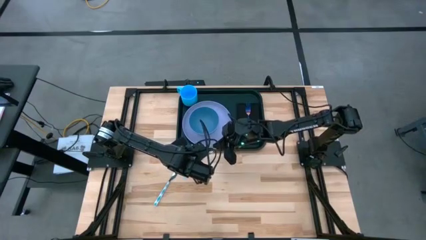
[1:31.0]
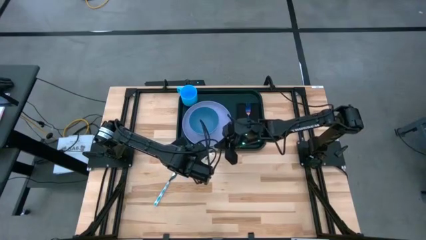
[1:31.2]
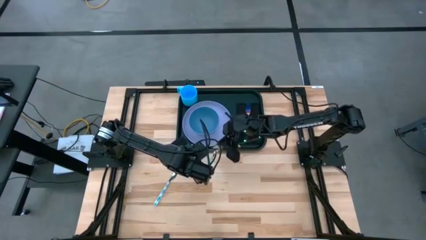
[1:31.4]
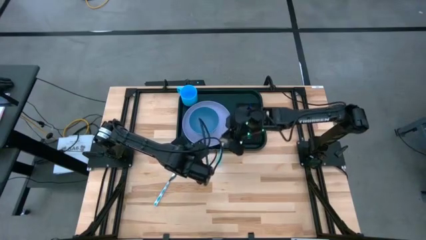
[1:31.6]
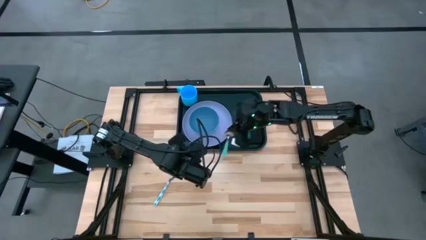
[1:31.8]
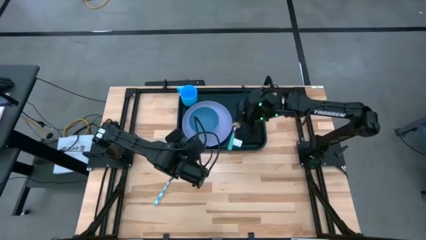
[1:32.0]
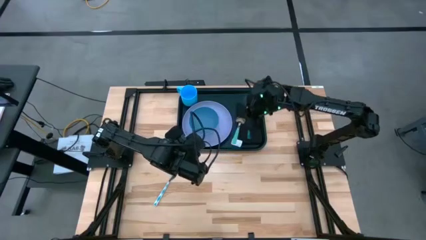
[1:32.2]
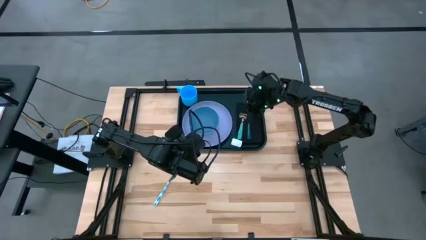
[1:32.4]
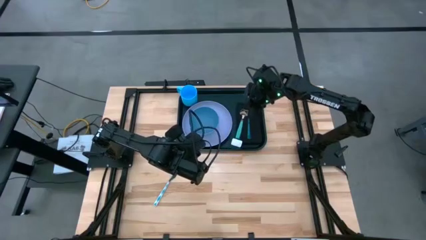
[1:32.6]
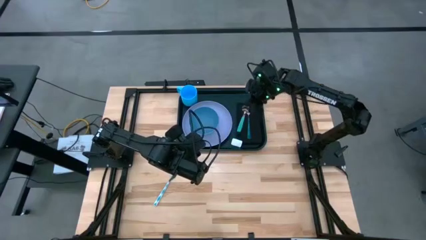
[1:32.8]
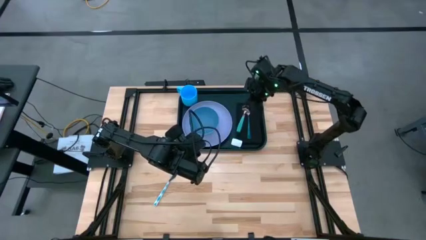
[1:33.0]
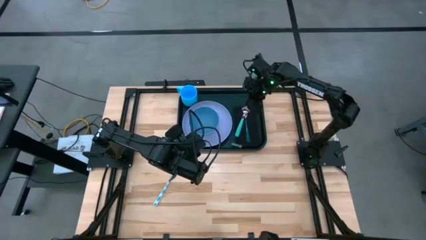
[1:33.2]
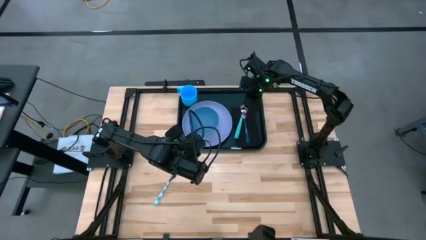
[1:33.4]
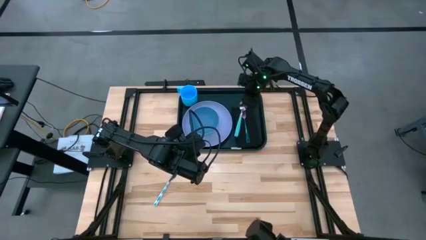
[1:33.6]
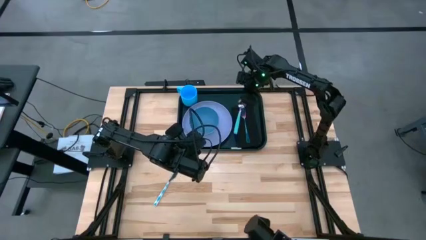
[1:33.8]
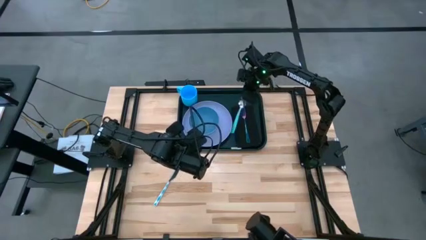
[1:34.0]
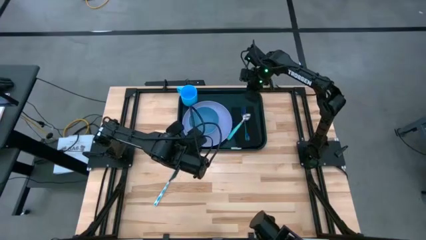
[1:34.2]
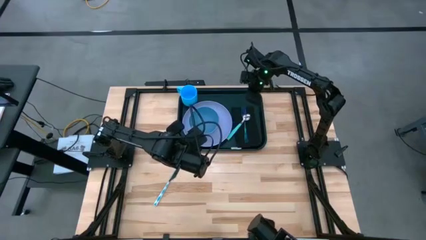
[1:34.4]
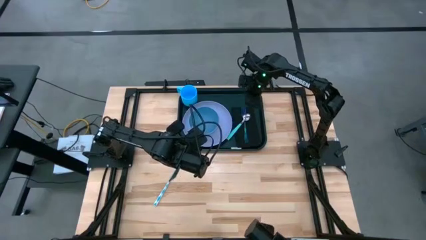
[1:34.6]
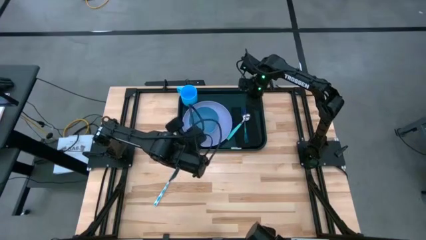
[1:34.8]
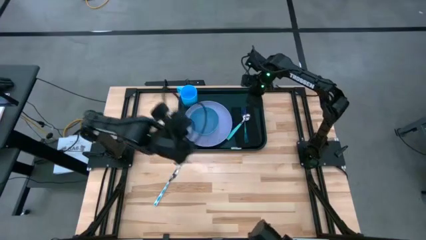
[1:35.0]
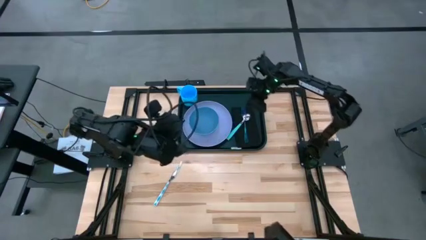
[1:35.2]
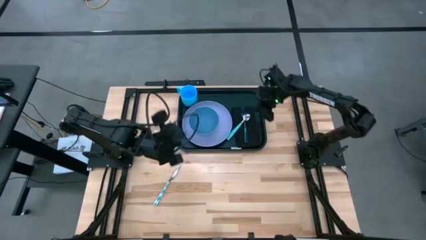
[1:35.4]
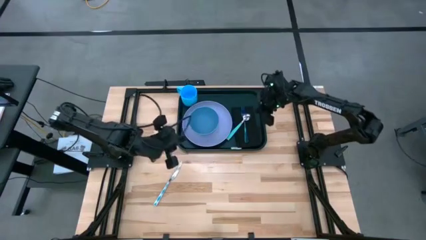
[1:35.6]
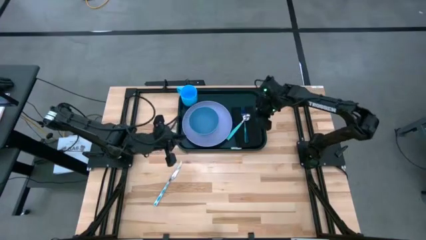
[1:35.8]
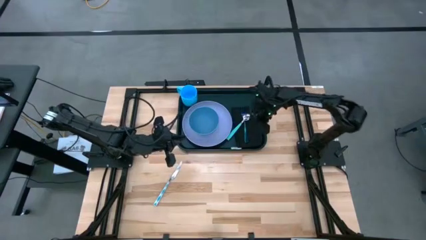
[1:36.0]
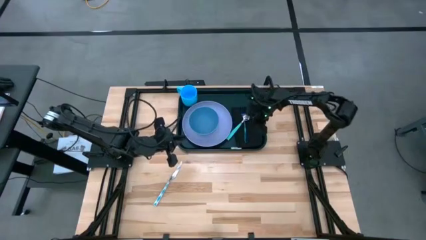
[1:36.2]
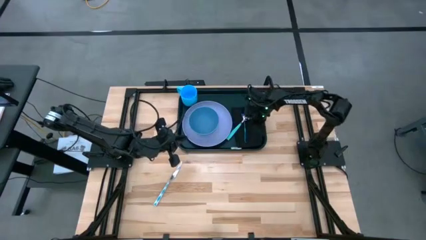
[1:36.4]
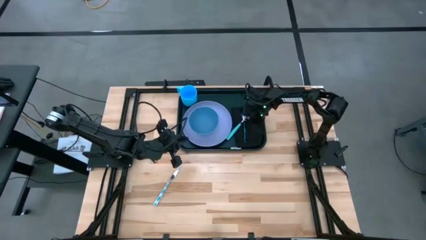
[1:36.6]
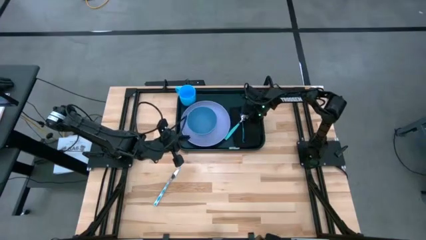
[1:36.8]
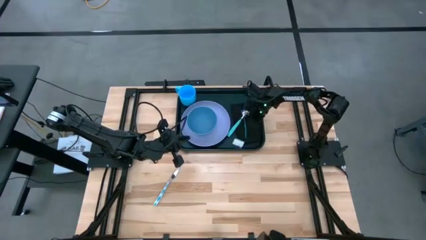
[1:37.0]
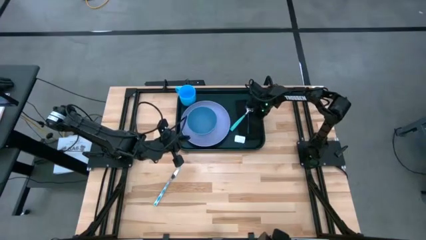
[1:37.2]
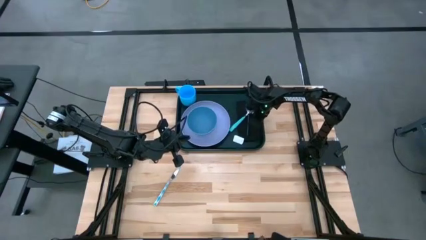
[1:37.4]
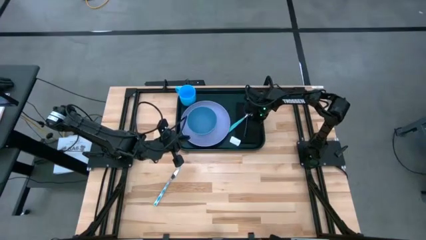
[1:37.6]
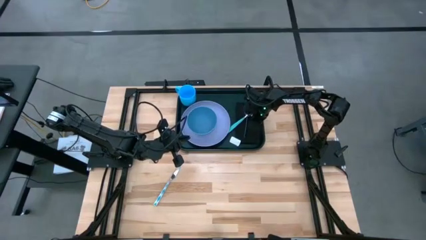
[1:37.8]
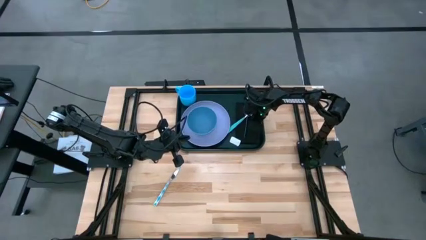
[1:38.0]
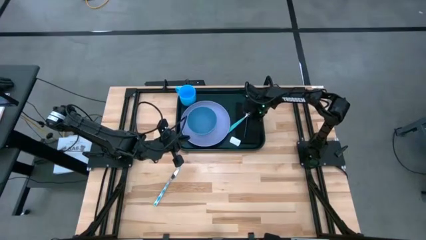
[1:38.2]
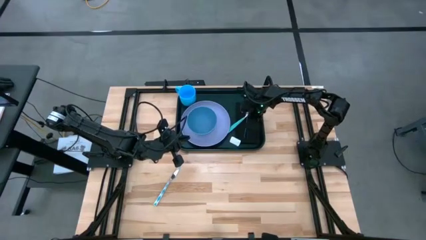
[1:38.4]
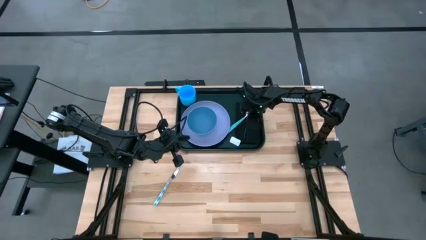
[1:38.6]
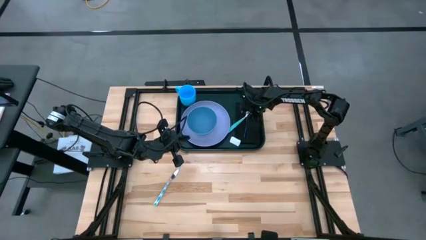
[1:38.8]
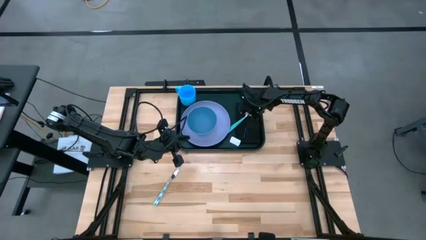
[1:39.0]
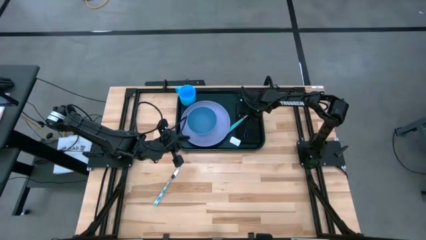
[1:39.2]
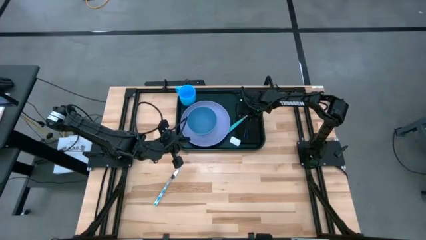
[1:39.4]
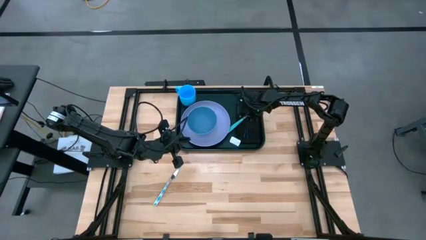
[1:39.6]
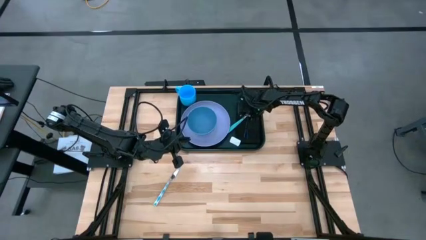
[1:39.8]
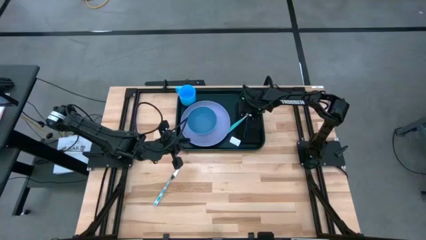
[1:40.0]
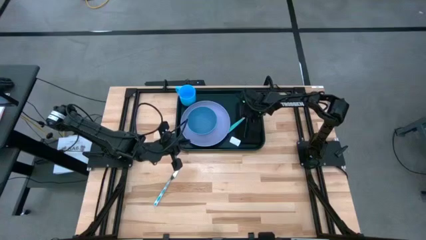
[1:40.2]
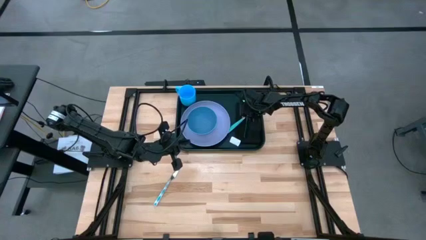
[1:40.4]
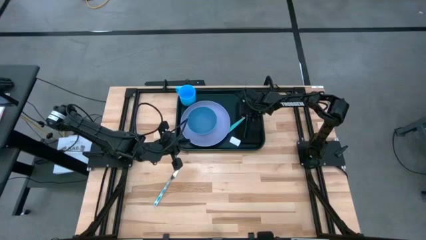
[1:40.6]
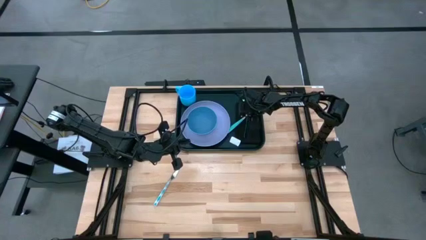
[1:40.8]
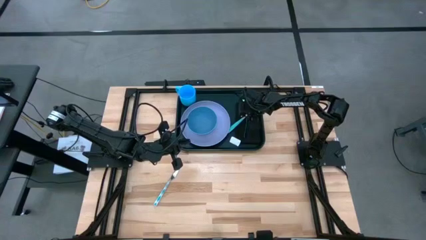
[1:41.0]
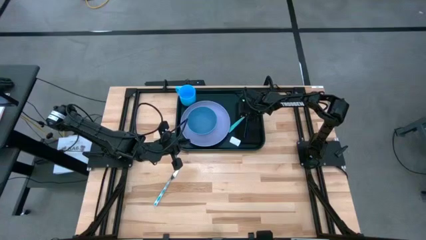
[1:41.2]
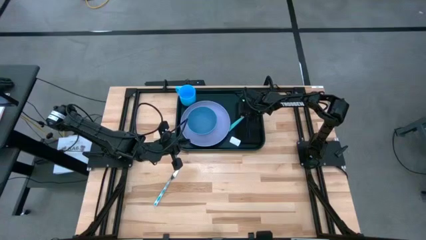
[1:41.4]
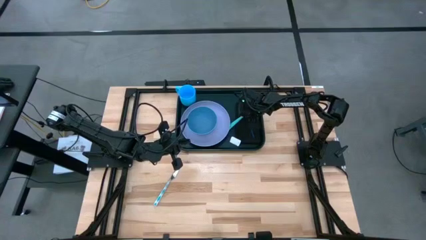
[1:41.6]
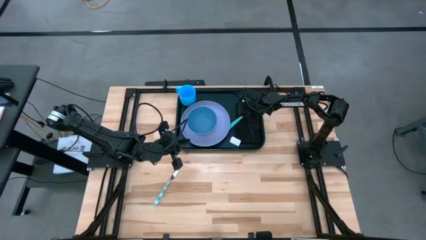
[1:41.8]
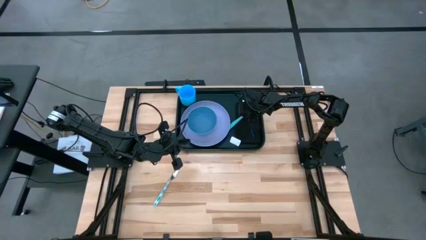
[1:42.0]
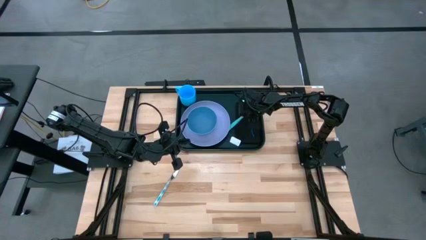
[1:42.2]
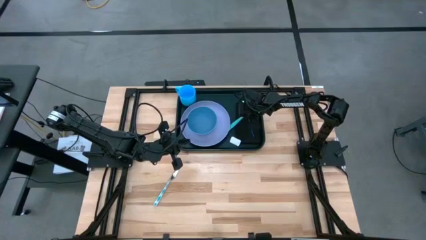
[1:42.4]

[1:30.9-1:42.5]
Task: Set up tray
Put the blue spoon on the black napkin to the left of the blue fork on the black tray

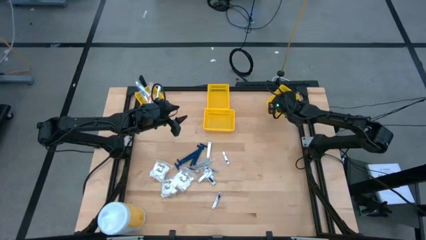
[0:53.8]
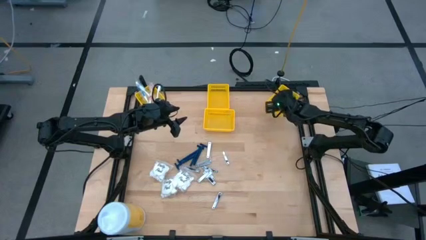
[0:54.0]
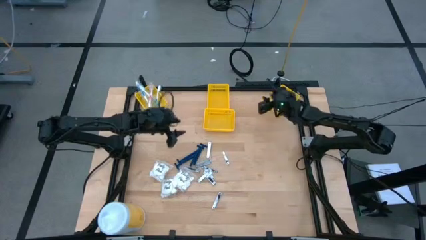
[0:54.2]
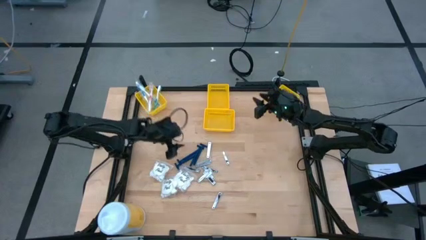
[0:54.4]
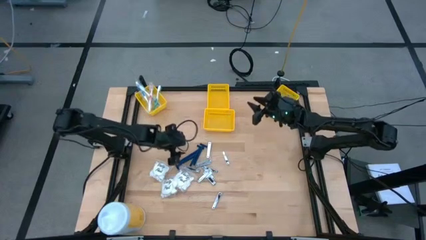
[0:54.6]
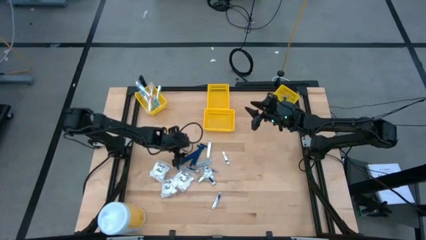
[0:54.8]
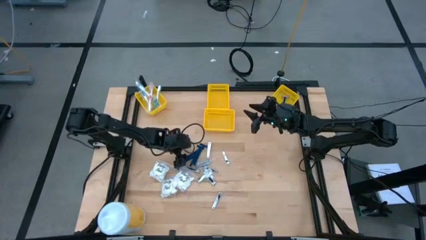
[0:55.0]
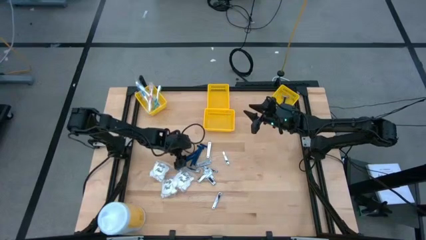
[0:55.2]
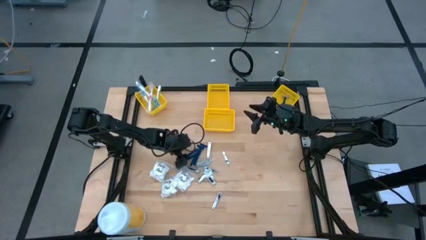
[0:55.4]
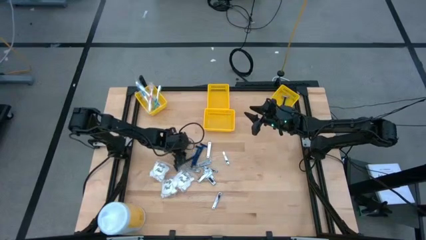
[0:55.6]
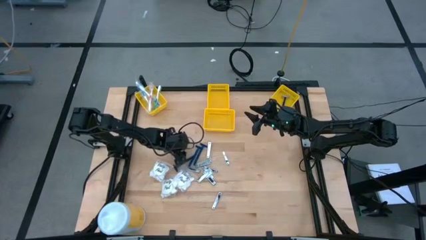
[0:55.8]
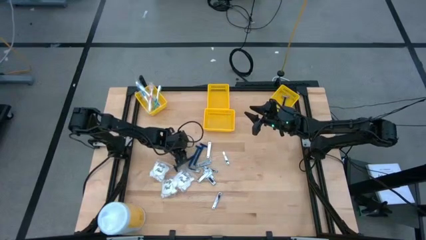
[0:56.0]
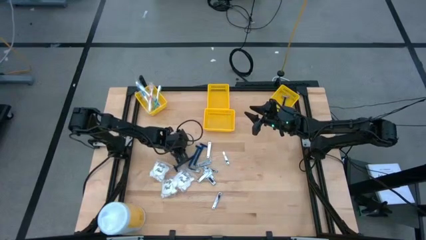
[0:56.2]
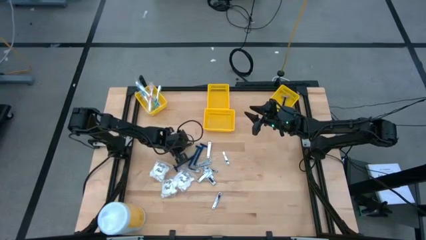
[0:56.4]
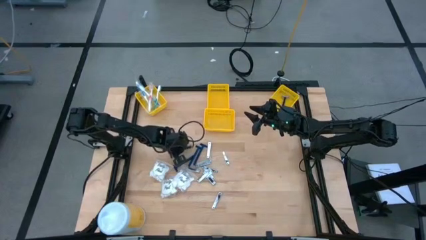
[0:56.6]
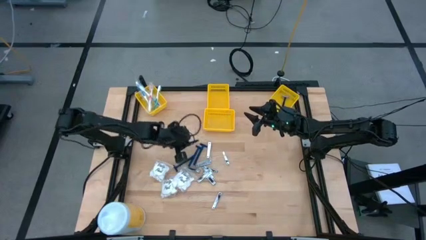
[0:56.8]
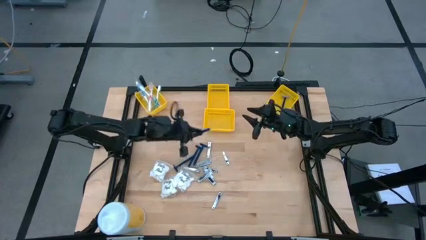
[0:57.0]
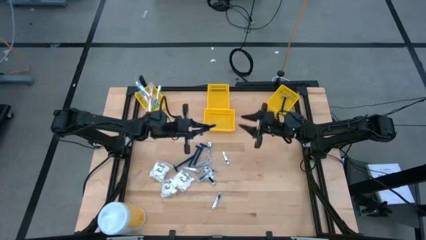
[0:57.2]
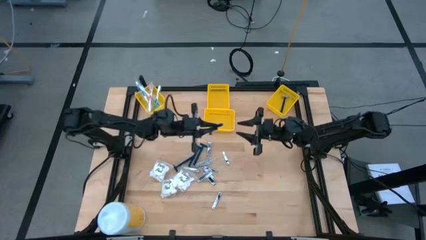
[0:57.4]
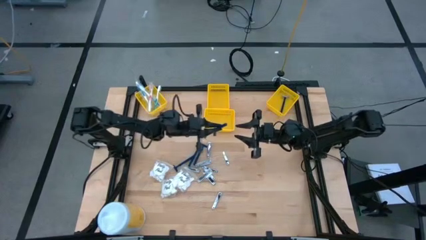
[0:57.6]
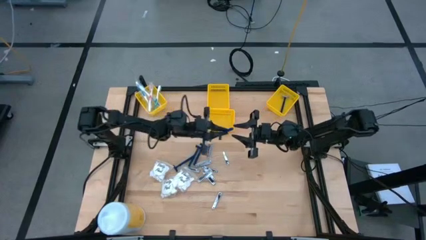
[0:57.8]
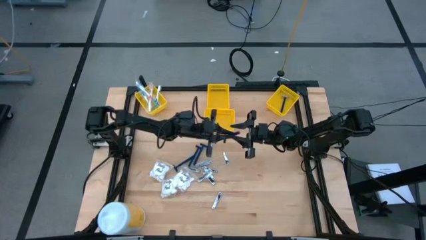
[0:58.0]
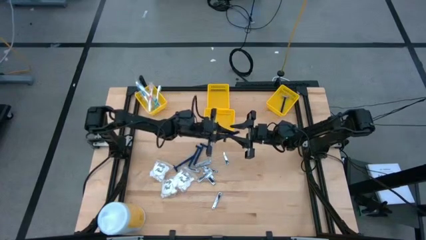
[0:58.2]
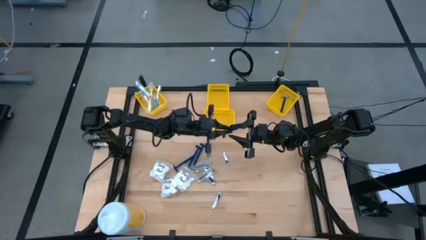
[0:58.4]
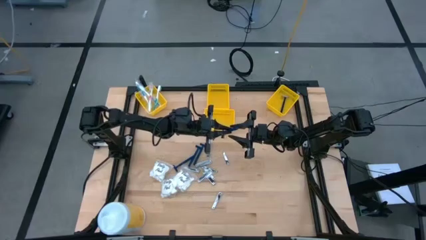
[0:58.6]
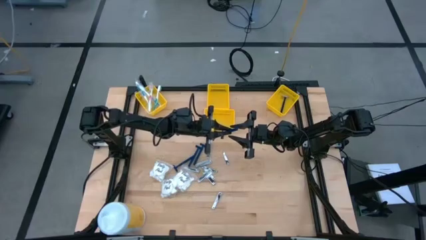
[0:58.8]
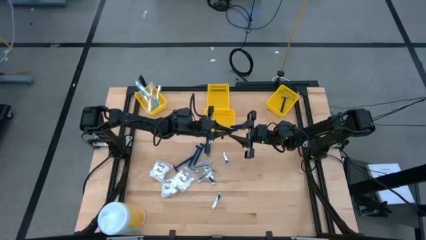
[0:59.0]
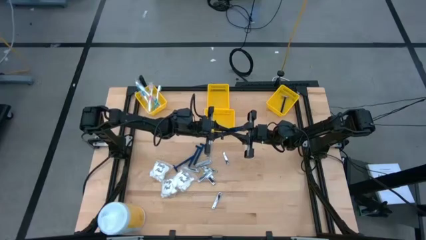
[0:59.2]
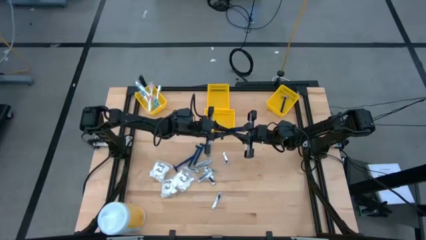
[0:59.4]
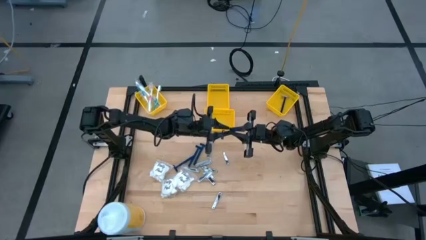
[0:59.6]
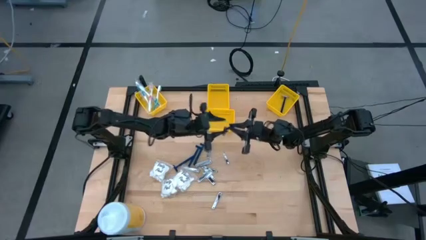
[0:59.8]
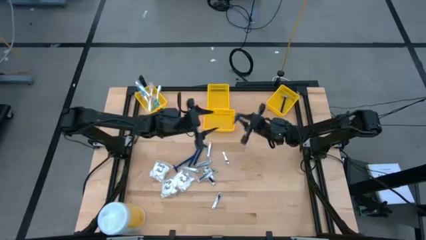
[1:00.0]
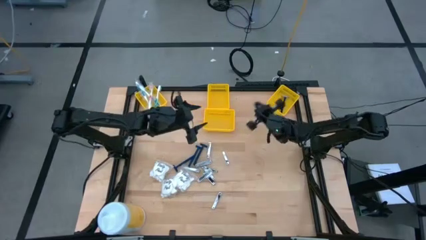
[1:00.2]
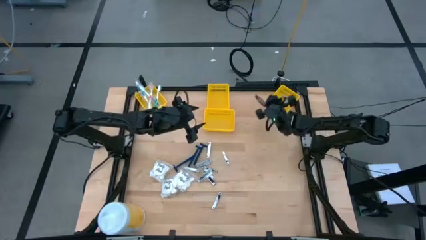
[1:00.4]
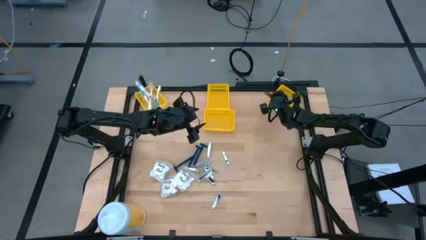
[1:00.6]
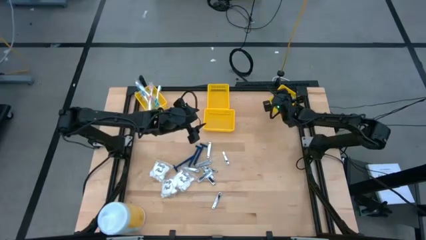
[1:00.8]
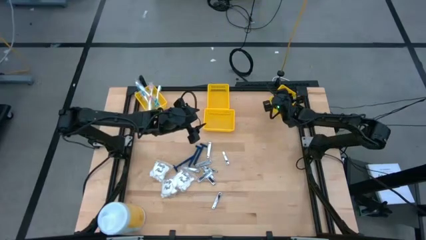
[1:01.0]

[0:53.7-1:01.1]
Task: Pick & Place Travel size toiletries
Put the blue razor into the right yellow bin
